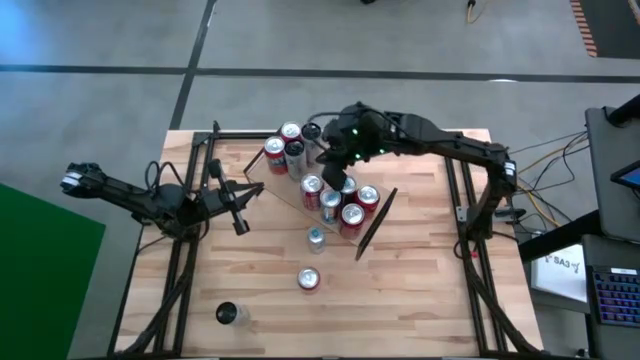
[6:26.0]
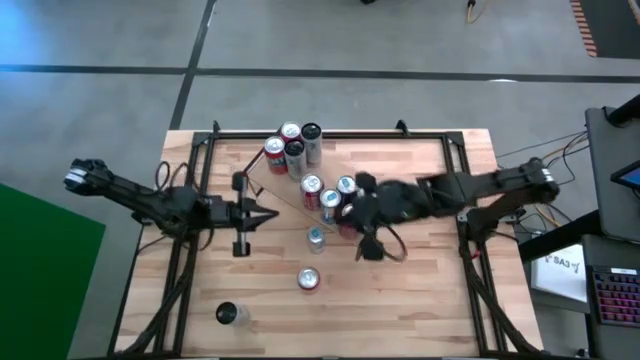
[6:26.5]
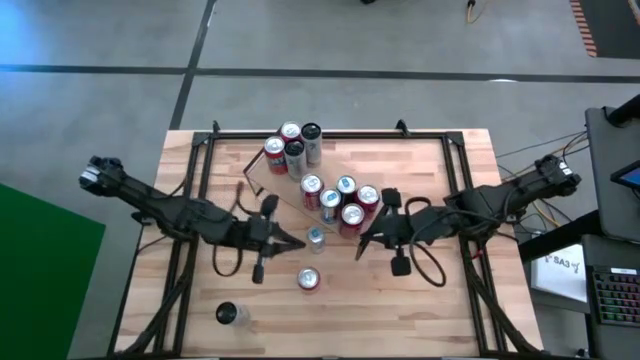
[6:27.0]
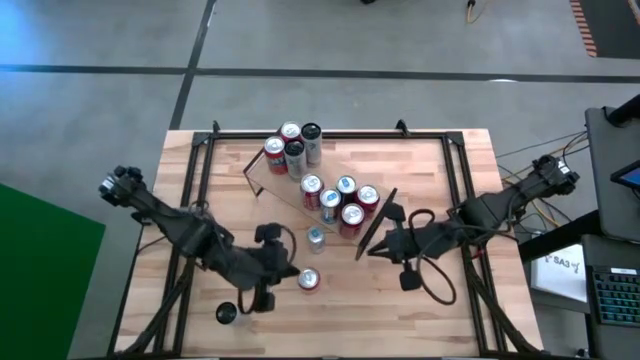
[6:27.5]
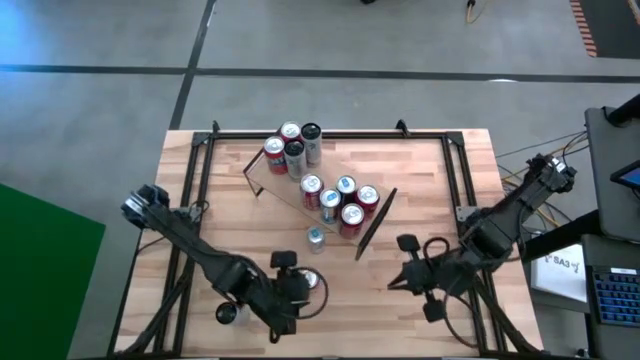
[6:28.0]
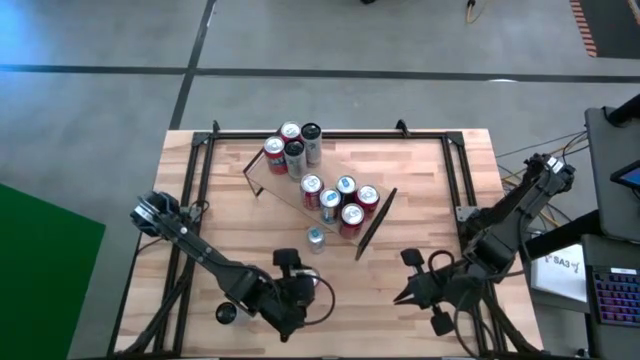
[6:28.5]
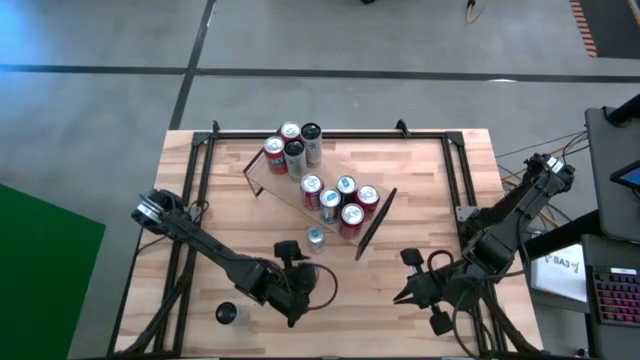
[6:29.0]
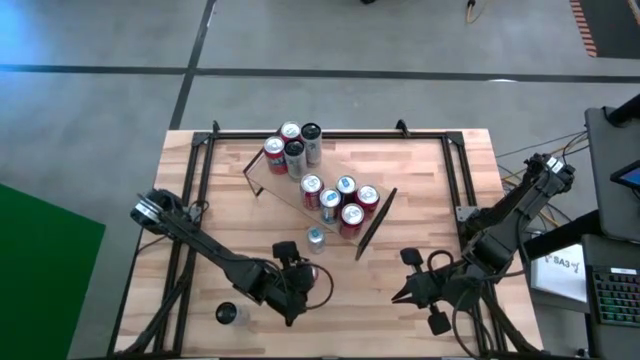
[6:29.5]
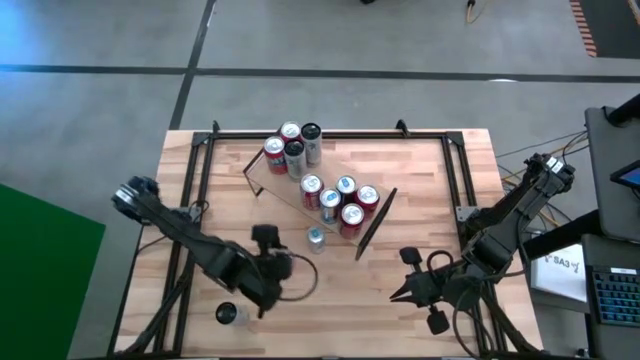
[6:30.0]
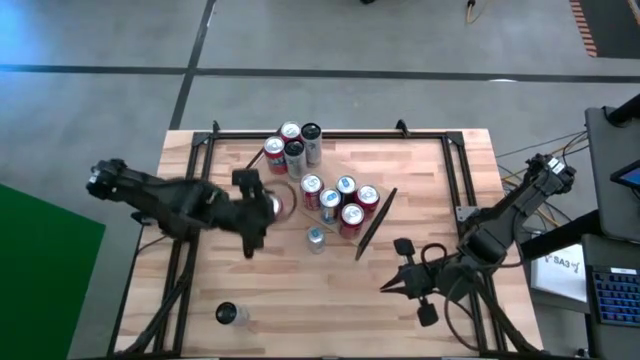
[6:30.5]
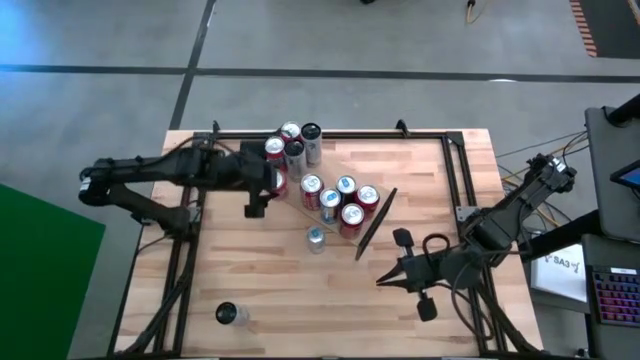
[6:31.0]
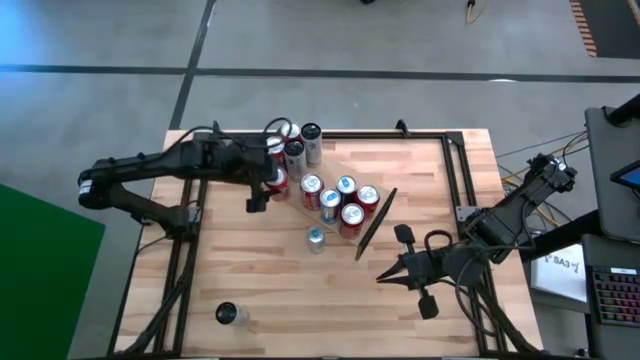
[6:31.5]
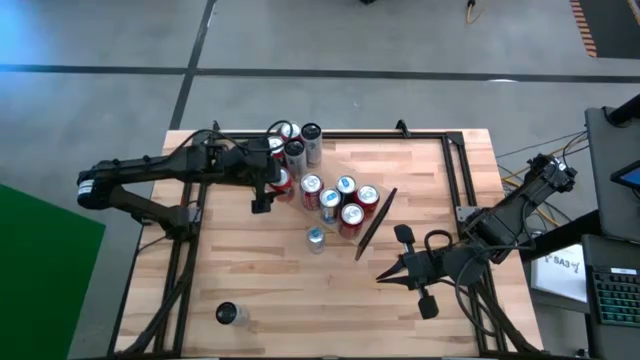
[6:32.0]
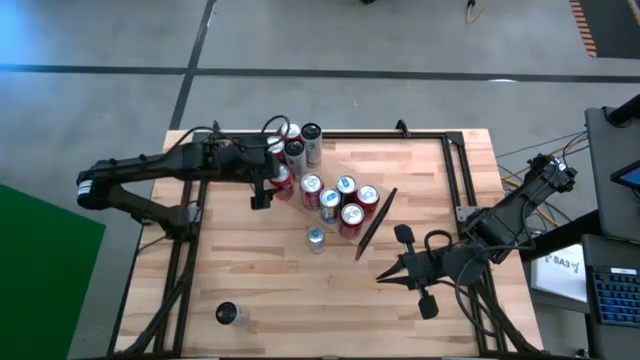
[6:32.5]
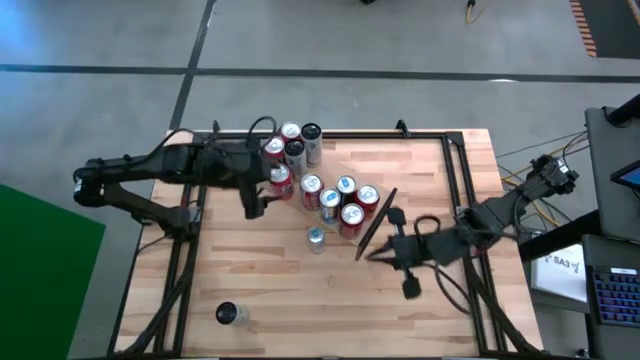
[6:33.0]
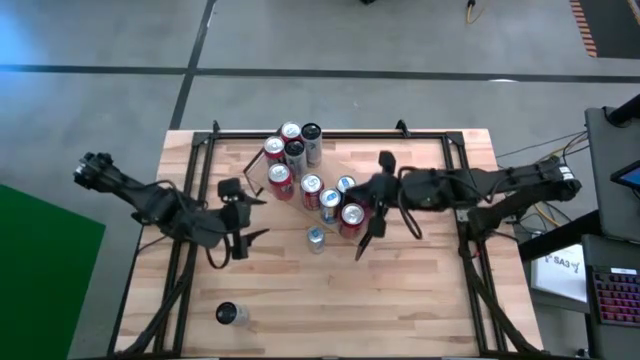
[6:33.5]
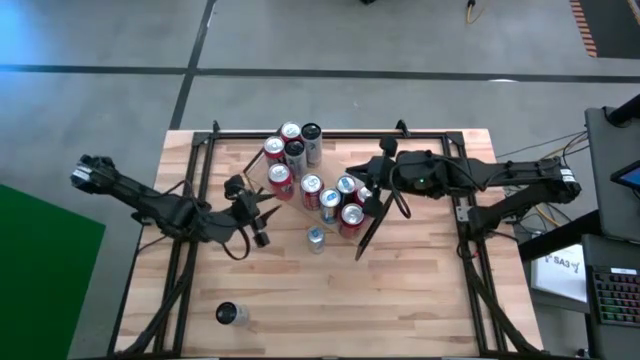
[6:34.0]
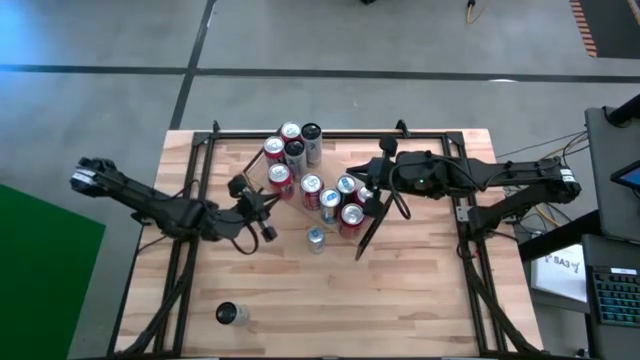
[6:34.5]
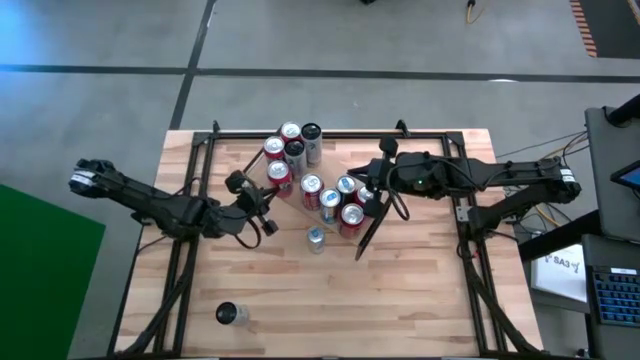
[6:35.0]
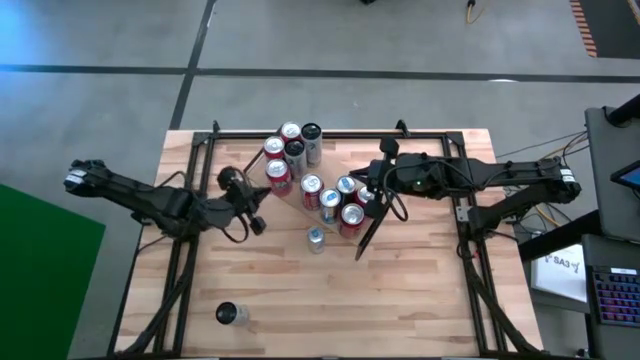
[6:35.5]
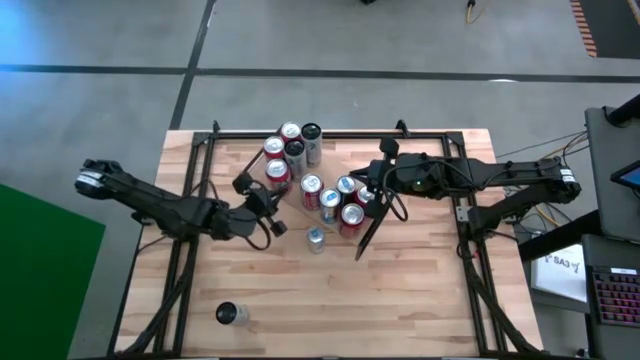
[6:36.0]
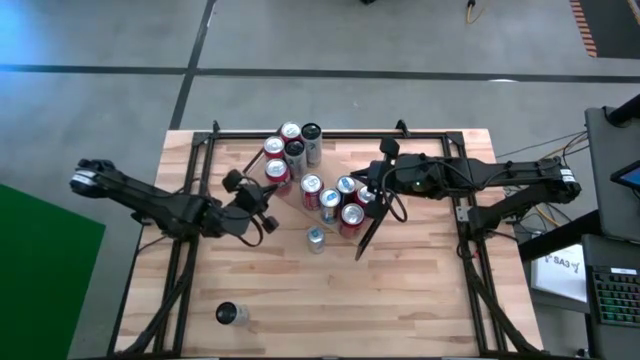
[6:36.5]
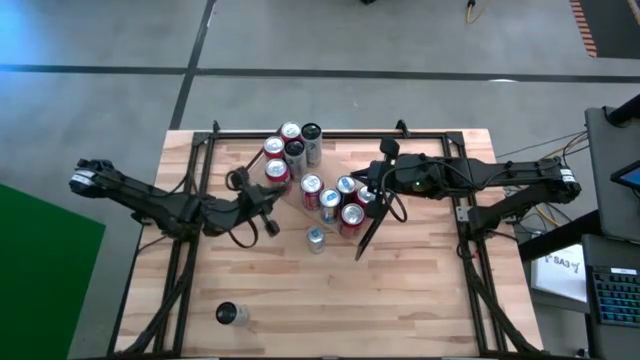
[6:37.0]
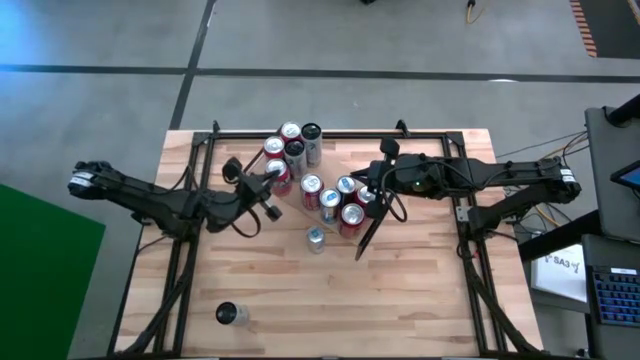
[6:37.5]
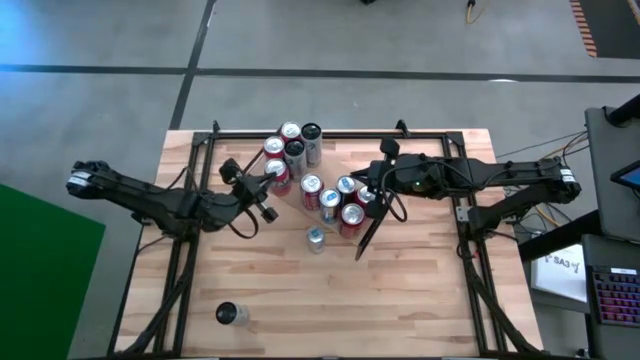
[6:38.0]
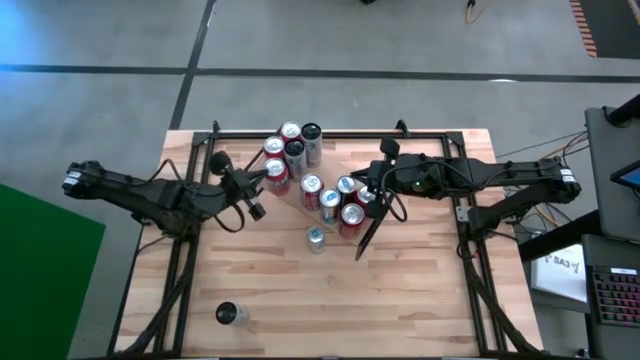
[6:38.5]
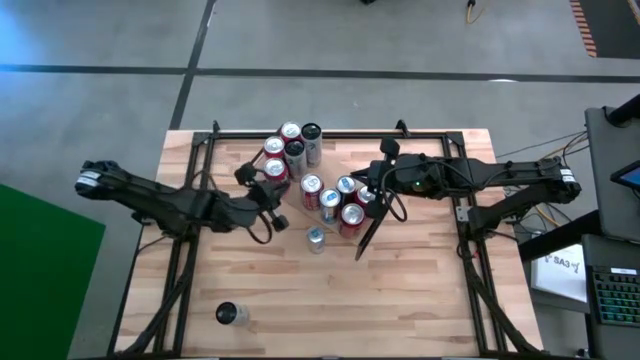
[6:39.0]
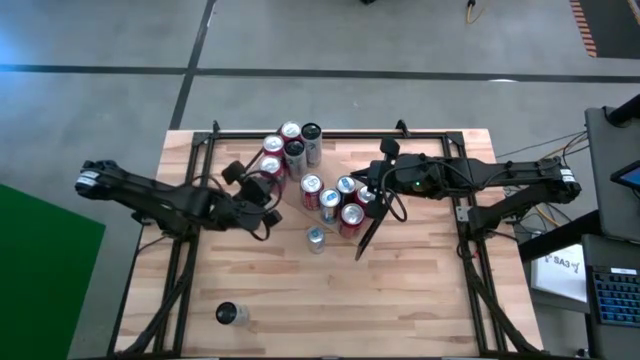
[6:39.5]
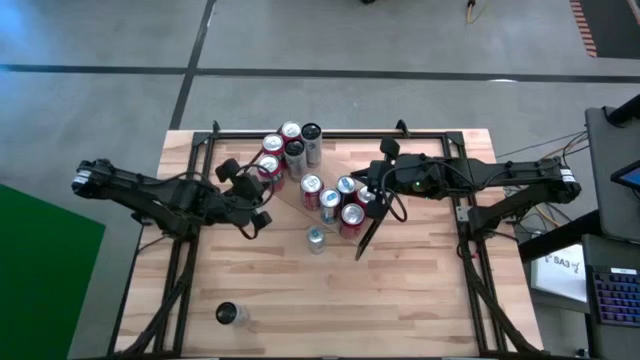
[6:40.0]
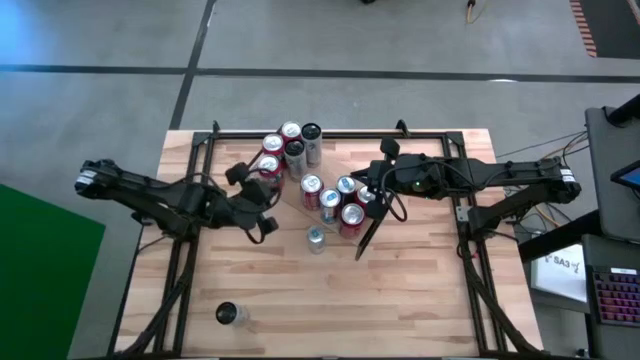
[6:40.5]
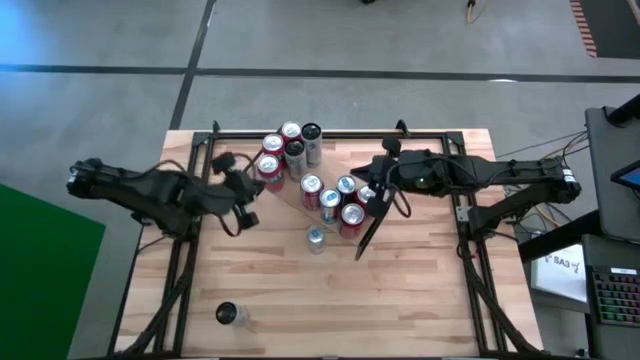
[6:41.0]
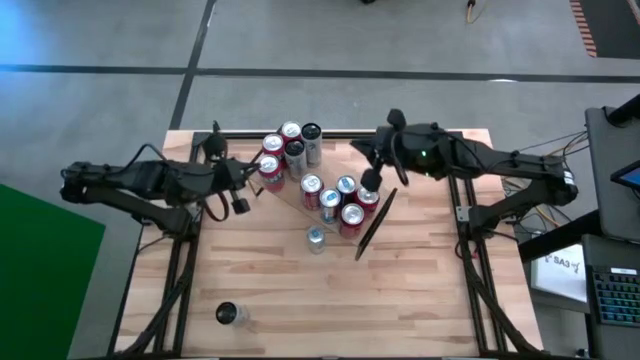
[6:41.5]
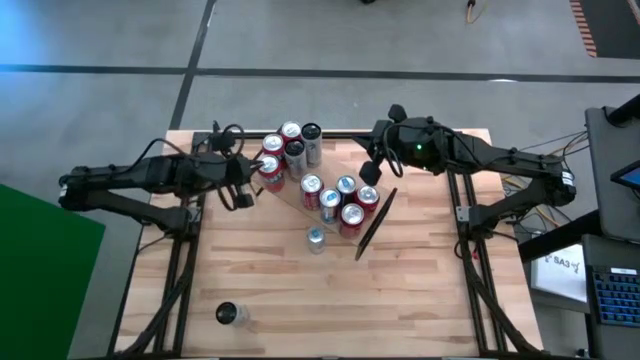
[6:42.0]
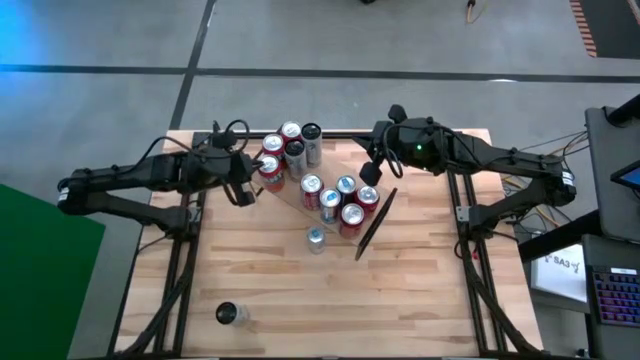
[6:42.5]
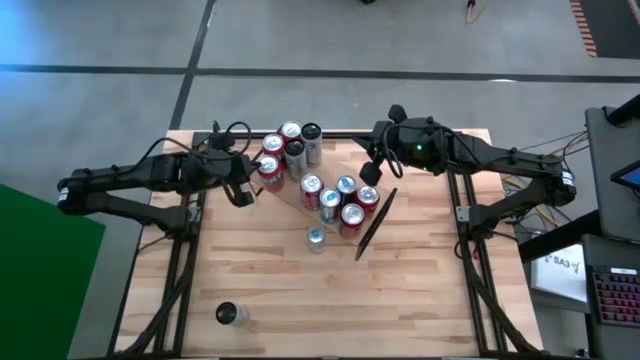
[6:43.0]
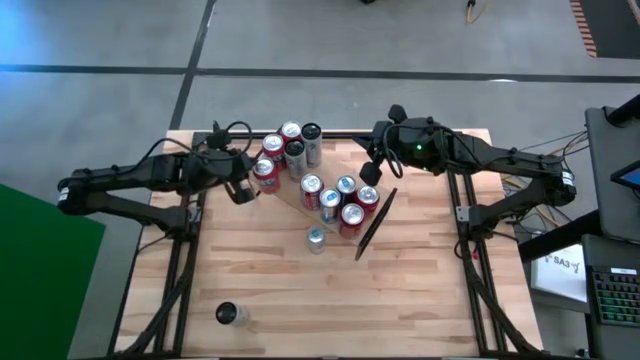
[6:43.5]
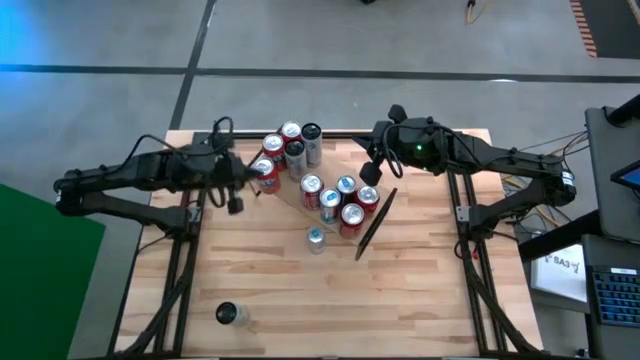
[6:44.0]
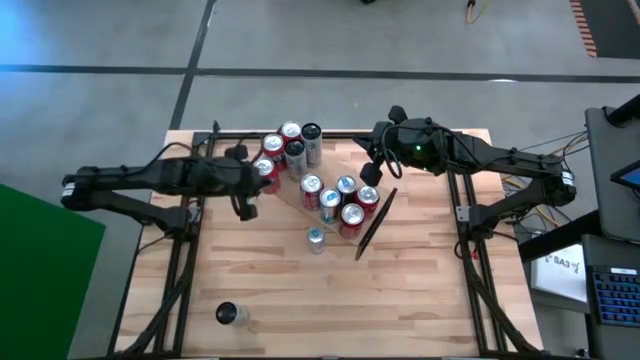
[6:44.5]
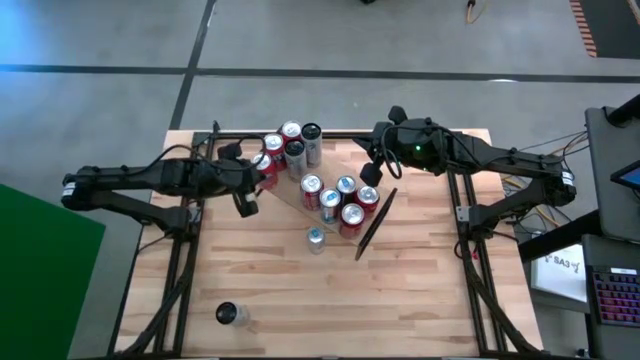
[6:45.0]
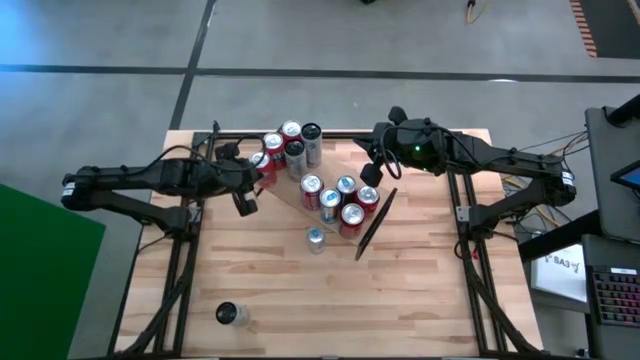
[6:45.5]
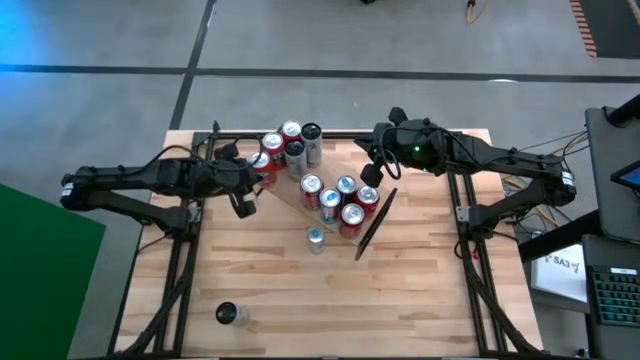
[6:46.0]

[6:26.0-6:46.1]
Task: Place canned beverage on shelf
Put the red soda can on the shelf, align with the other red soda cans
